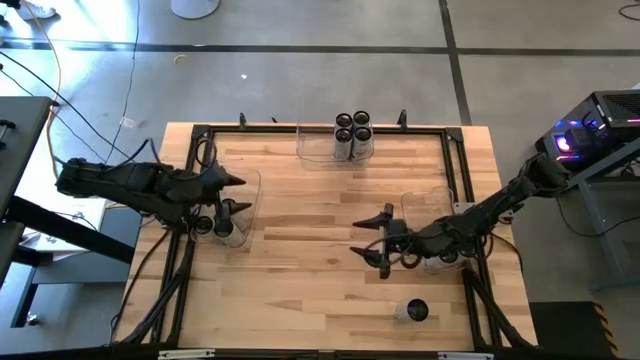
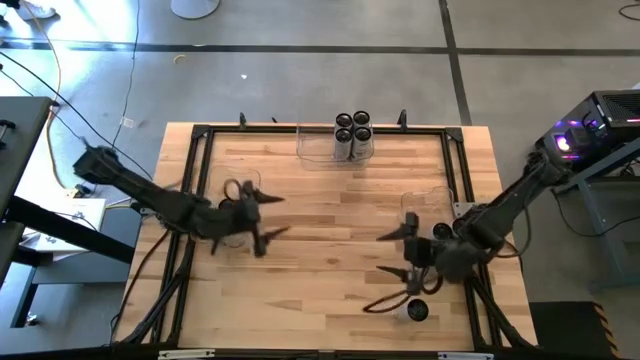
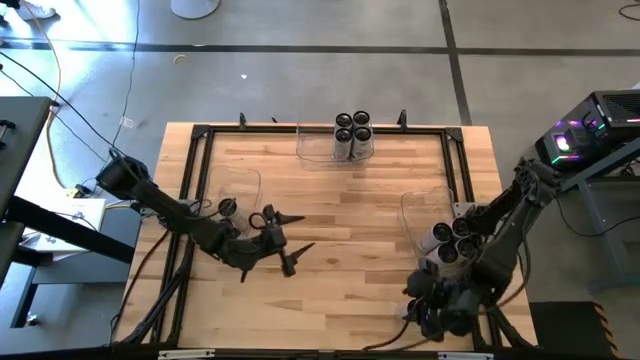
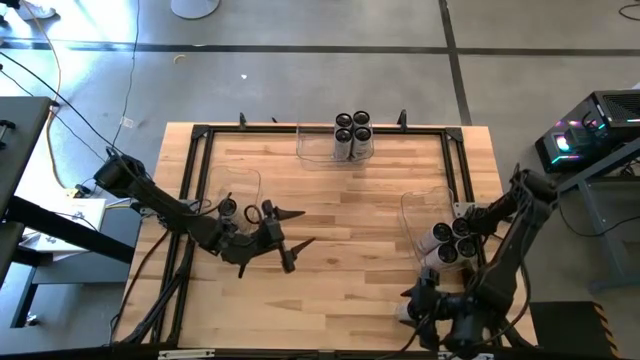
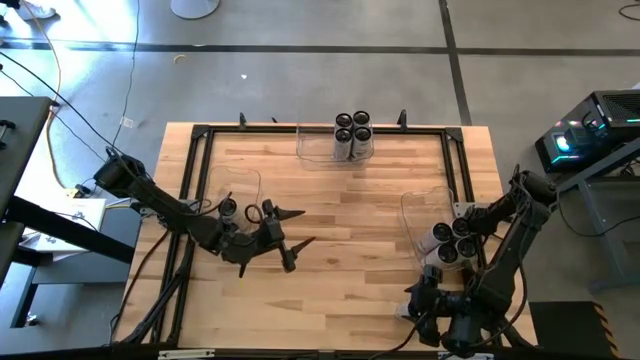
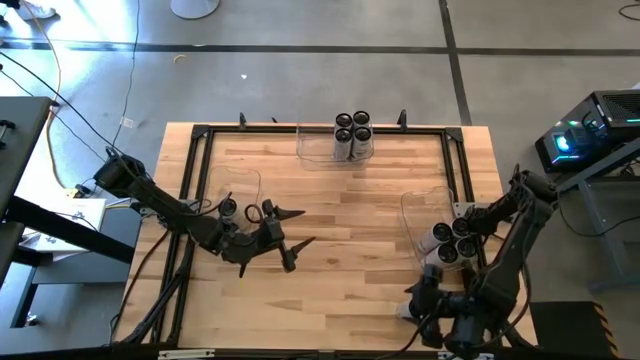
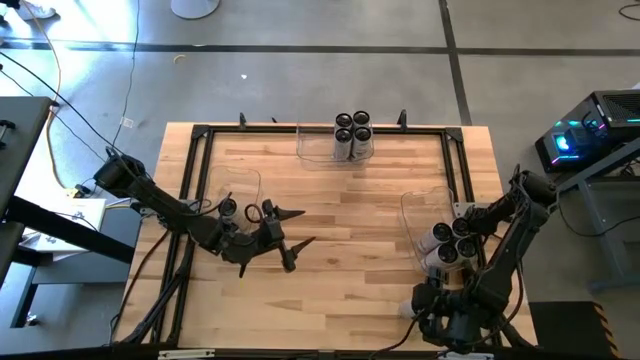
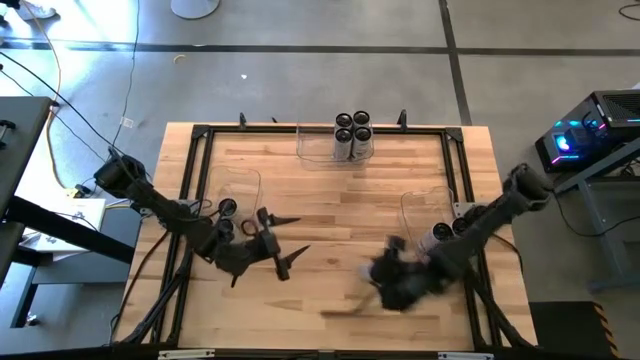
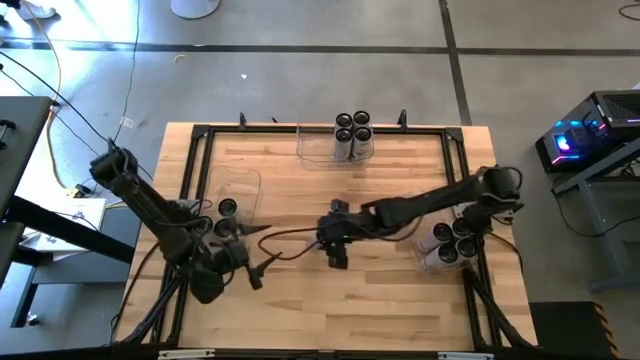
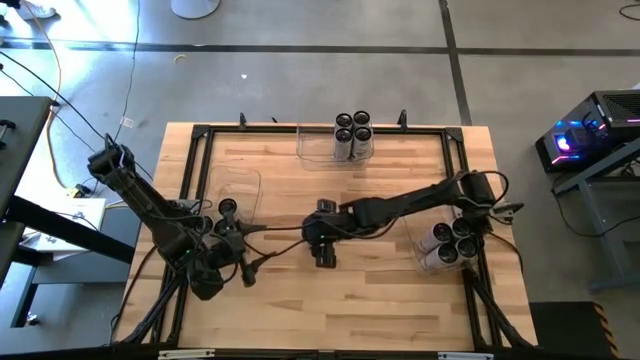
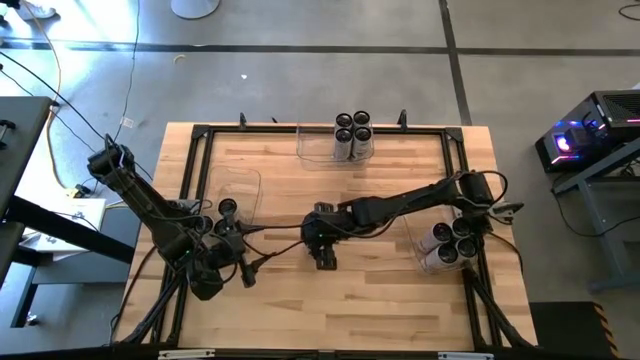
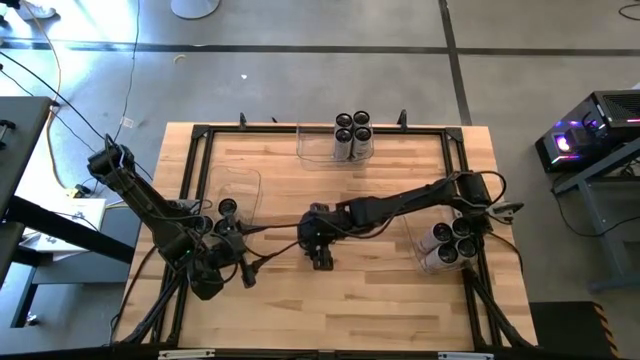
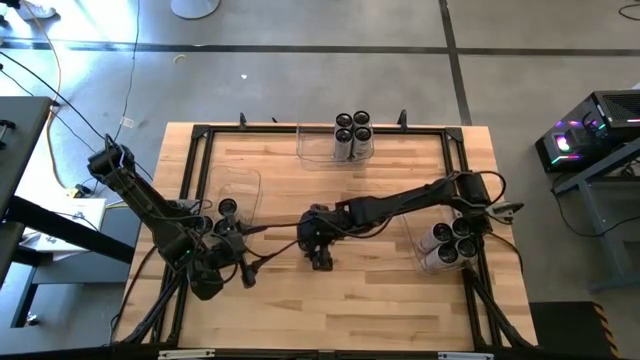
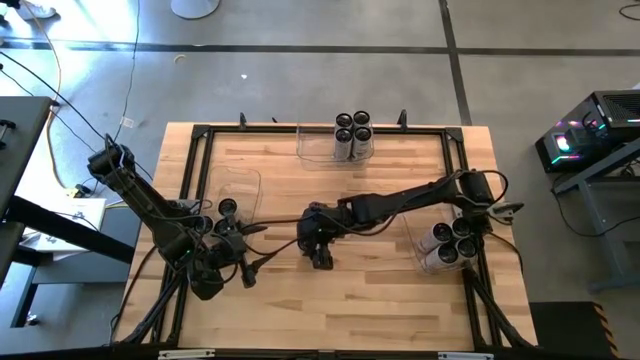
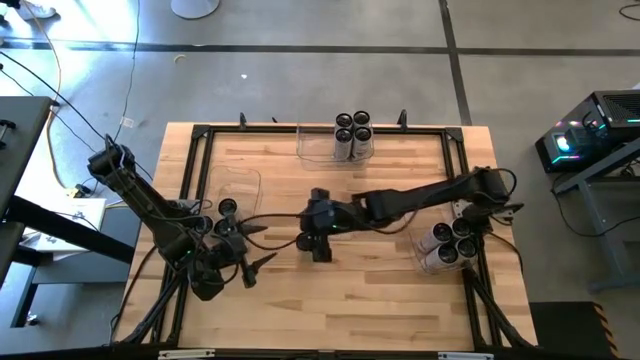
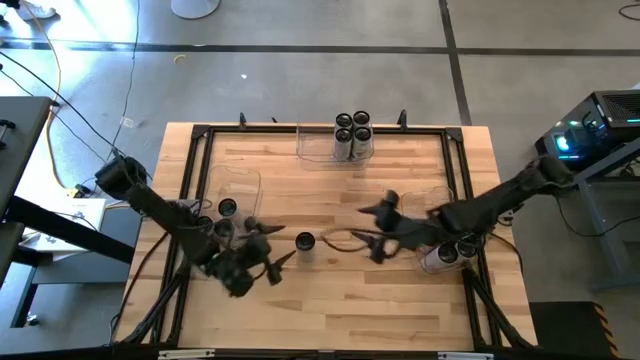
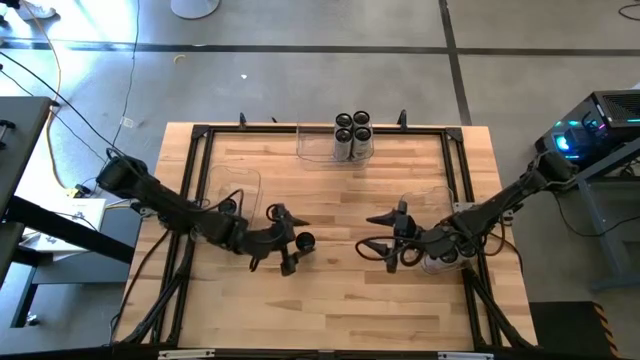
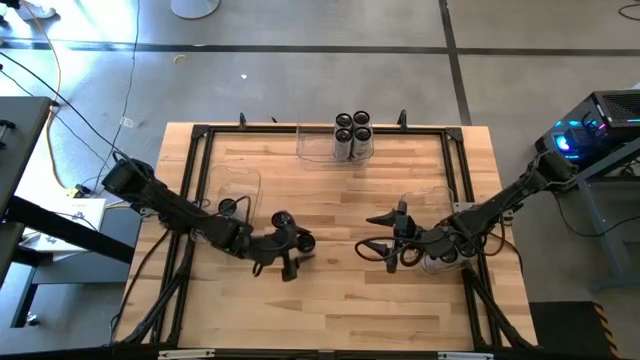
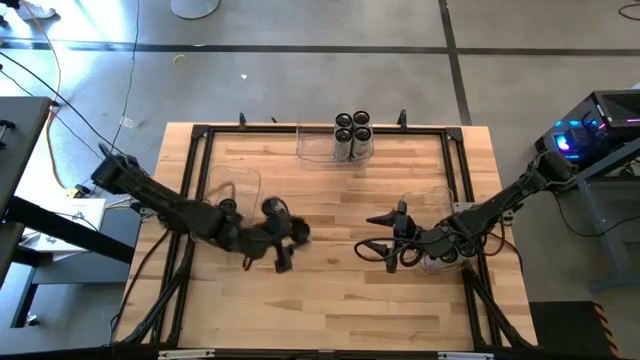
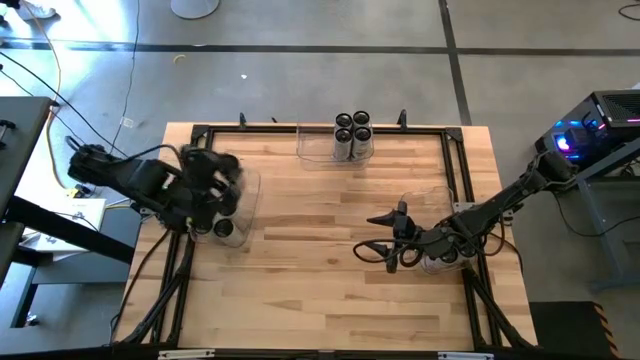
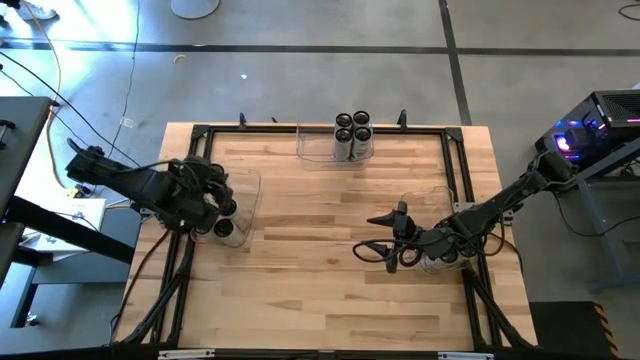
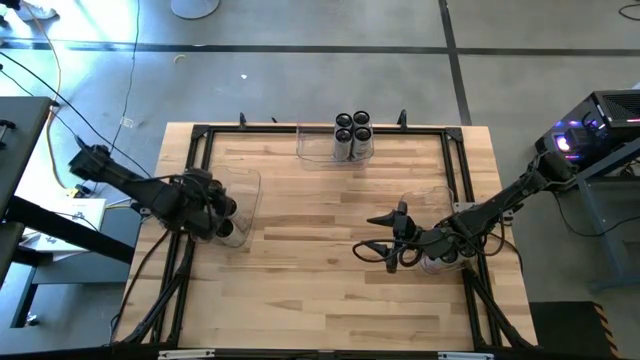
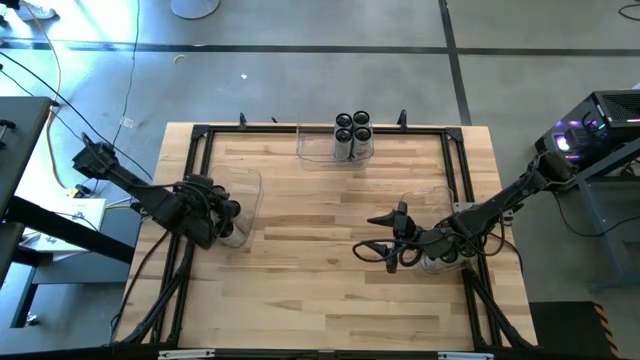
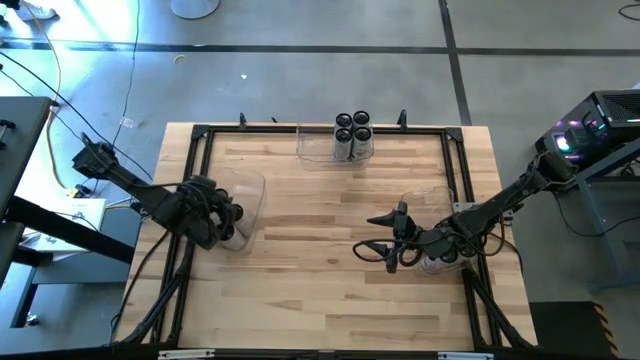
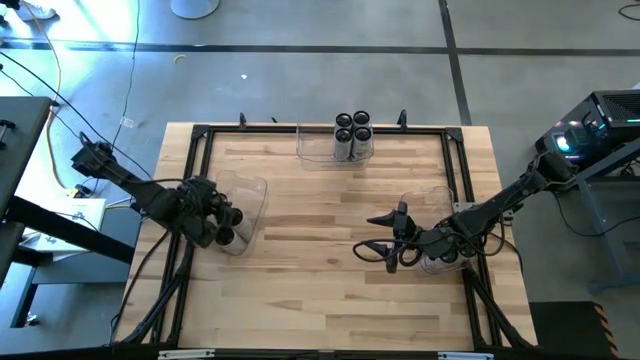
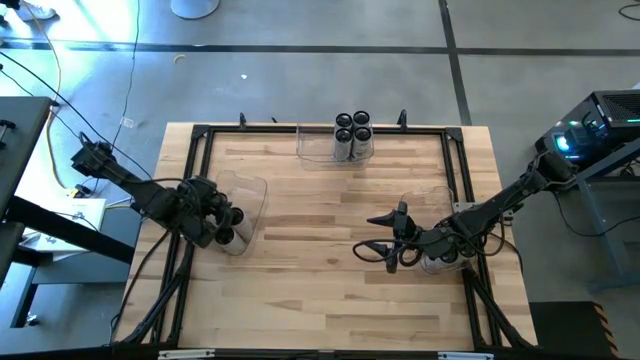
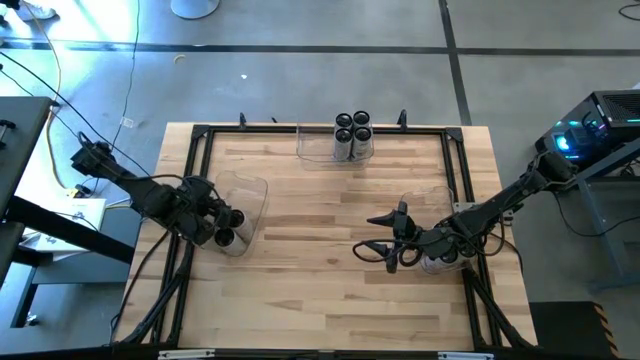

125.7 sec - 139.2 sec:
Task: Sort soda cans
Put the white-yellow soda can into the middle left transparent bin

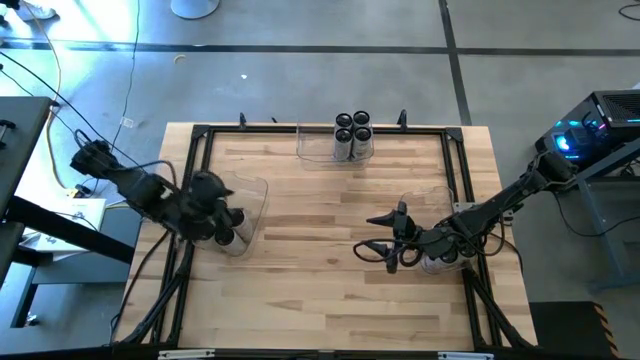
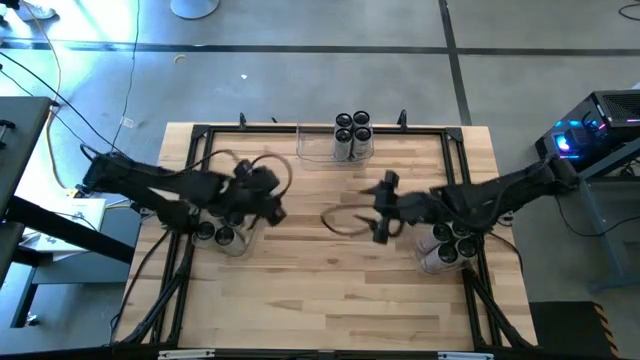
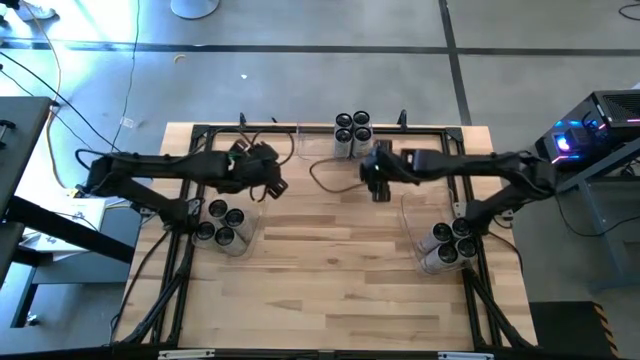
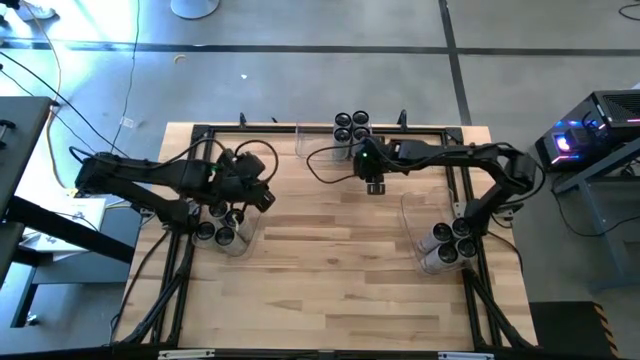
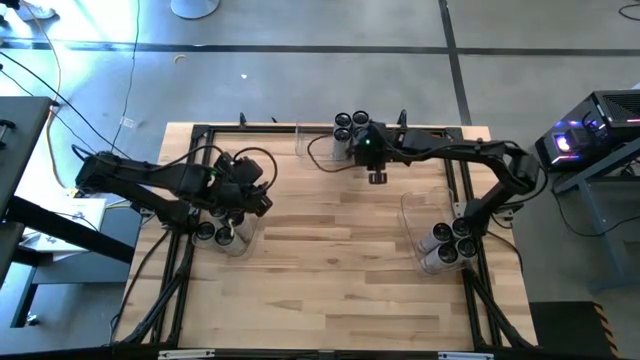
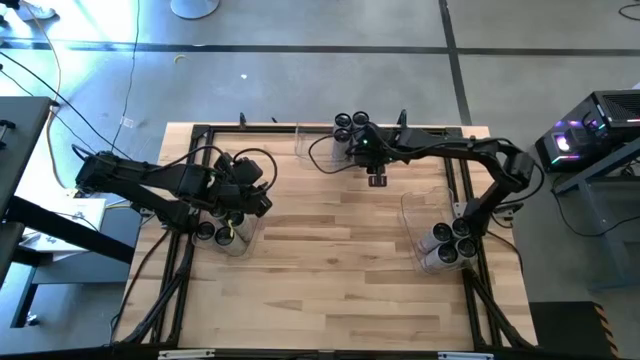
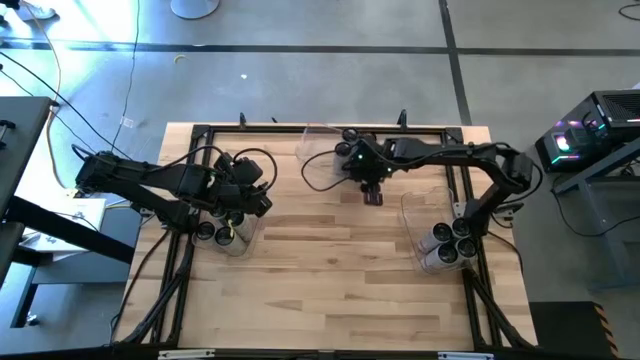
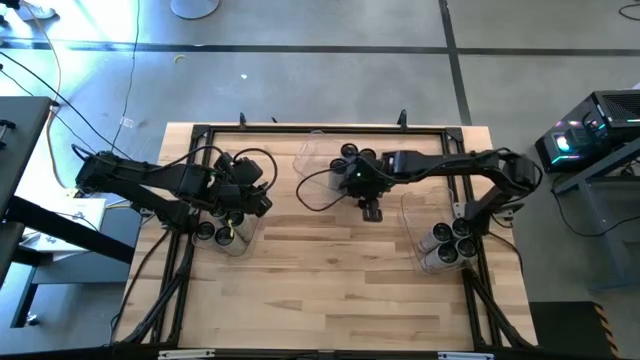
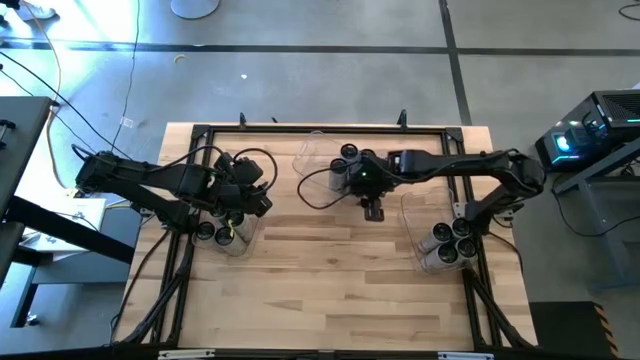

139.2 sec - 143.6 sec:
Adjust the middle transparent bin

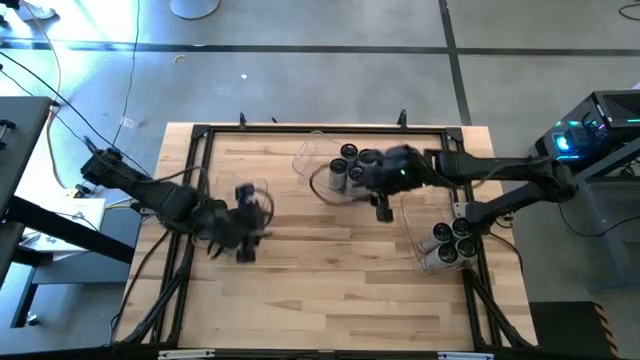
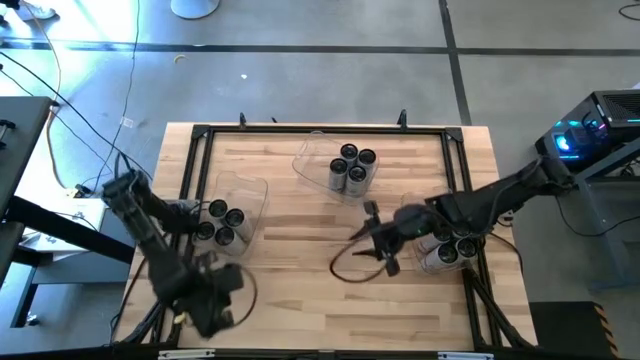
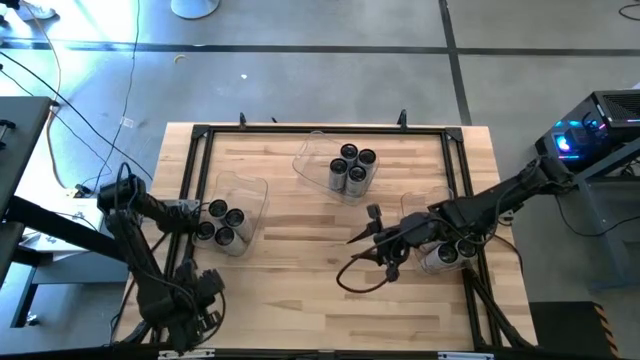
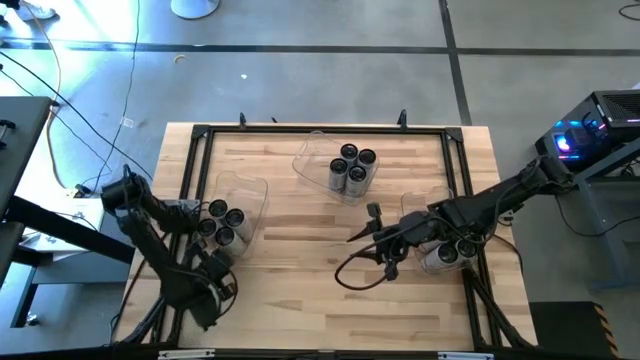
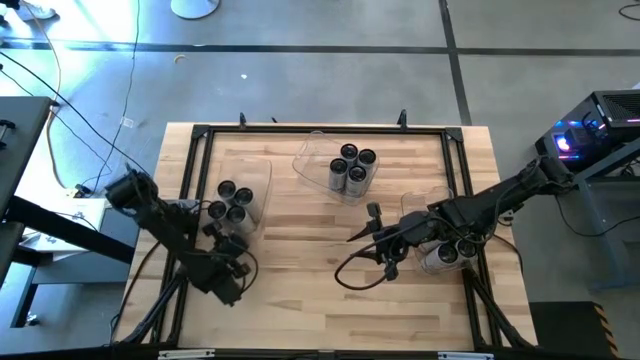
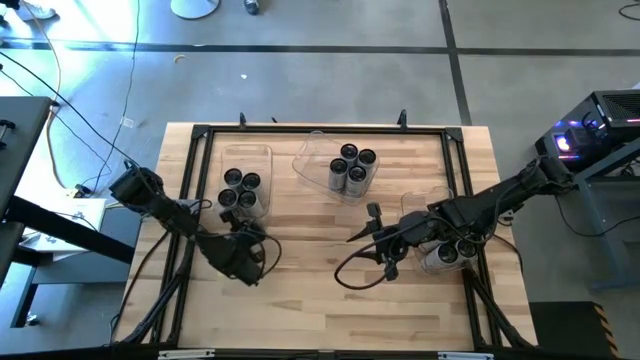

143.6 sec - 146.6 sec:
Adjust the left transparent bin
